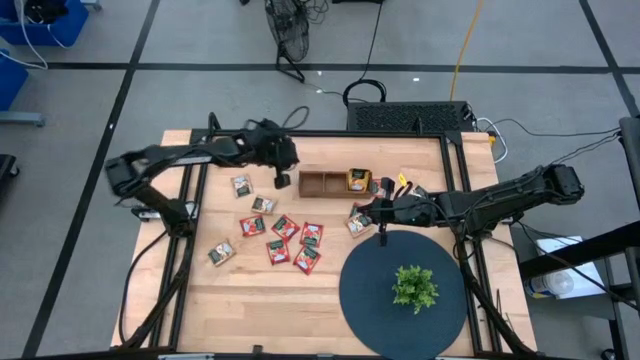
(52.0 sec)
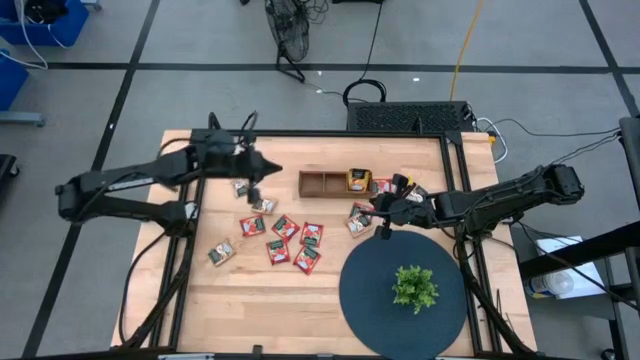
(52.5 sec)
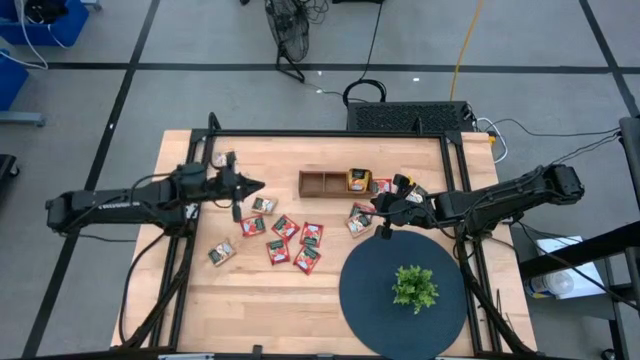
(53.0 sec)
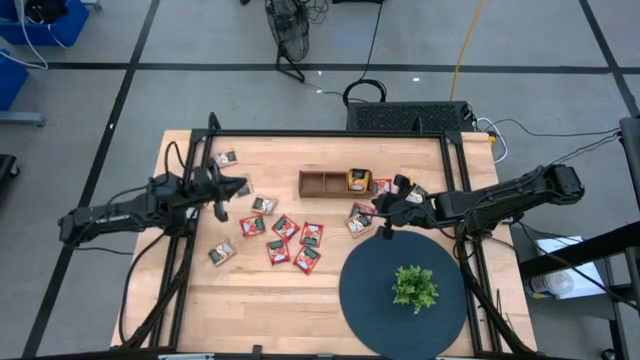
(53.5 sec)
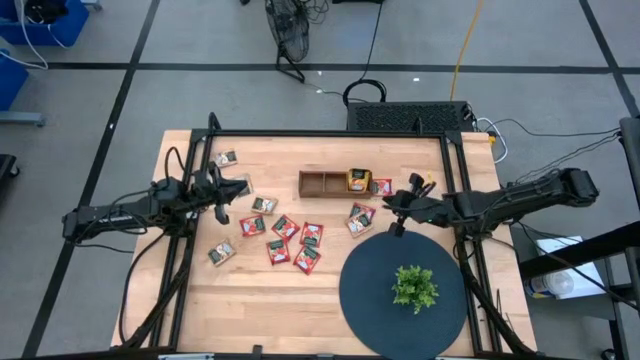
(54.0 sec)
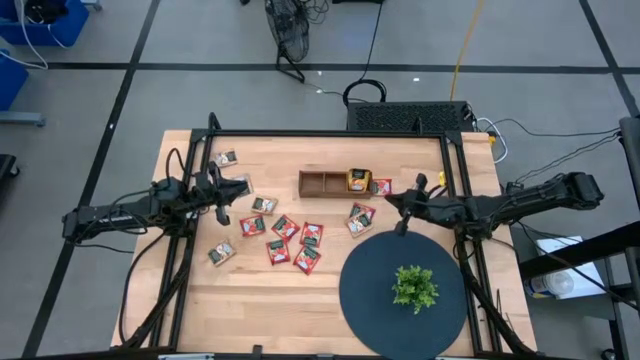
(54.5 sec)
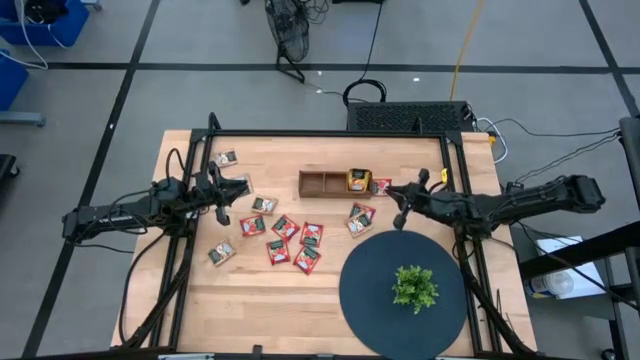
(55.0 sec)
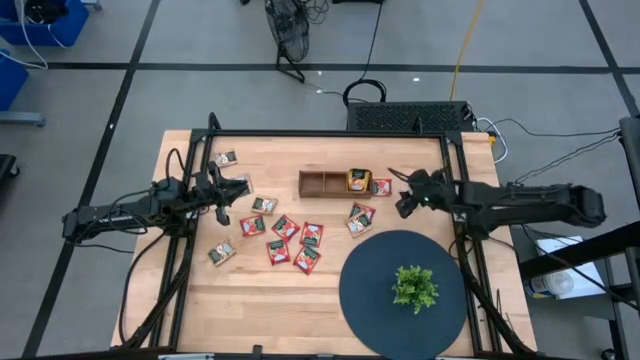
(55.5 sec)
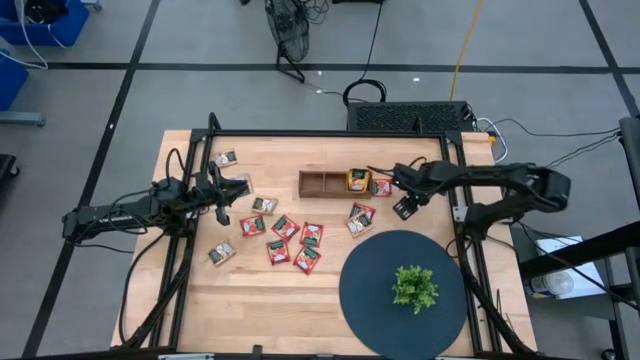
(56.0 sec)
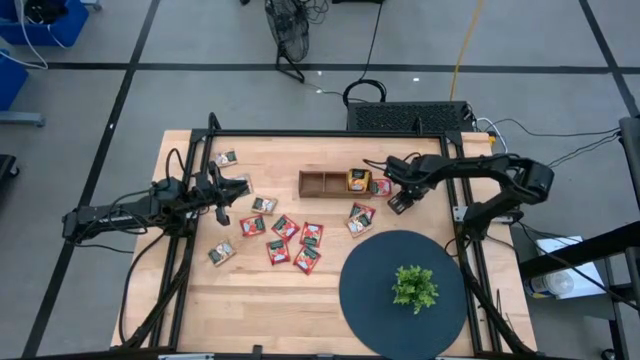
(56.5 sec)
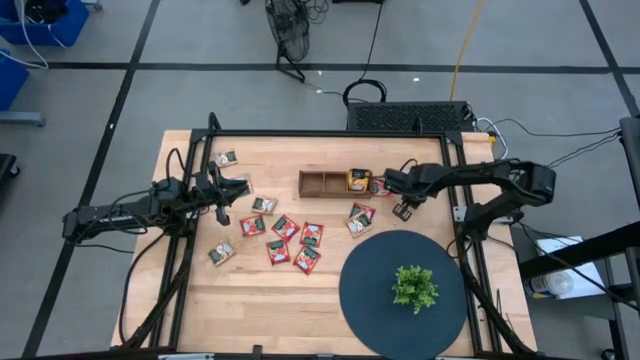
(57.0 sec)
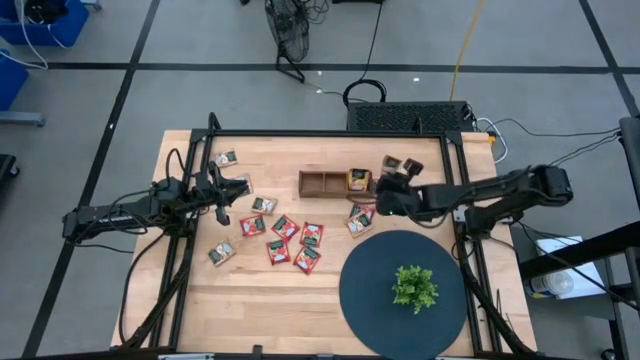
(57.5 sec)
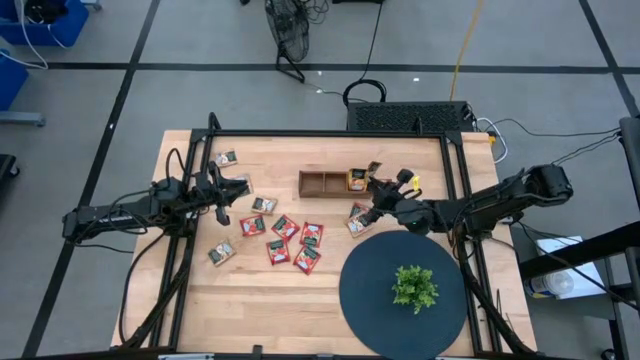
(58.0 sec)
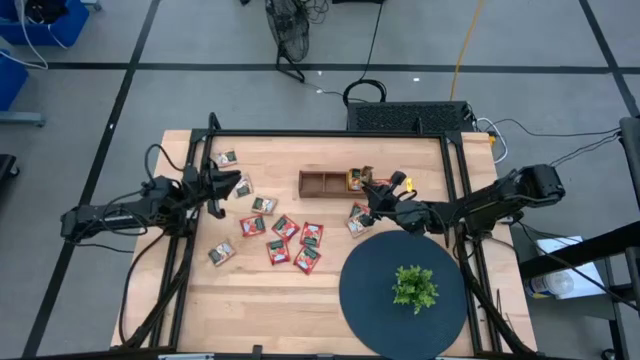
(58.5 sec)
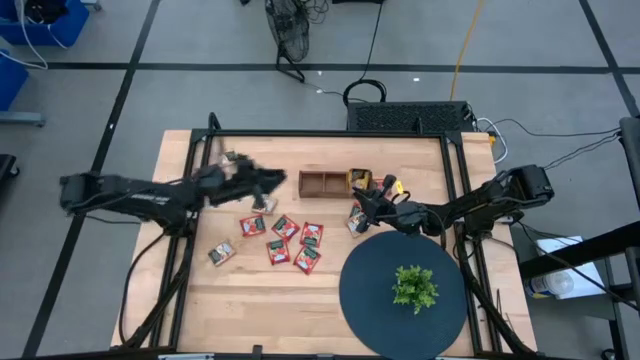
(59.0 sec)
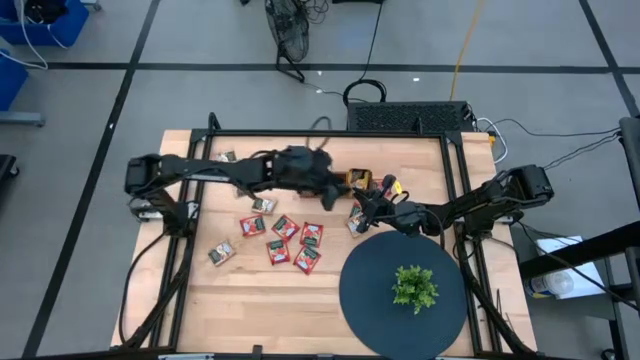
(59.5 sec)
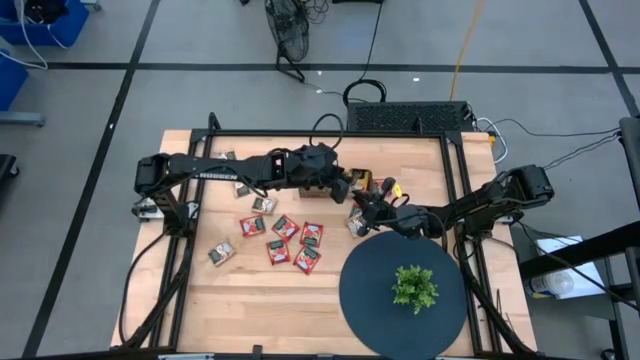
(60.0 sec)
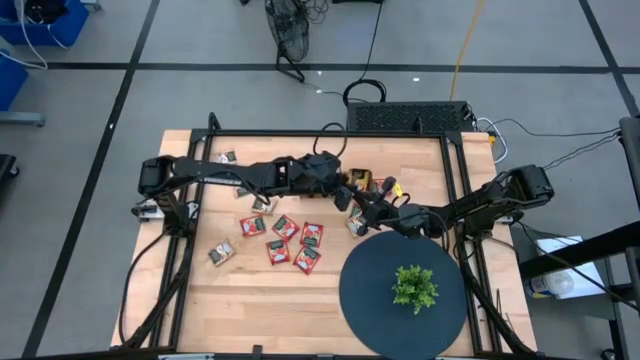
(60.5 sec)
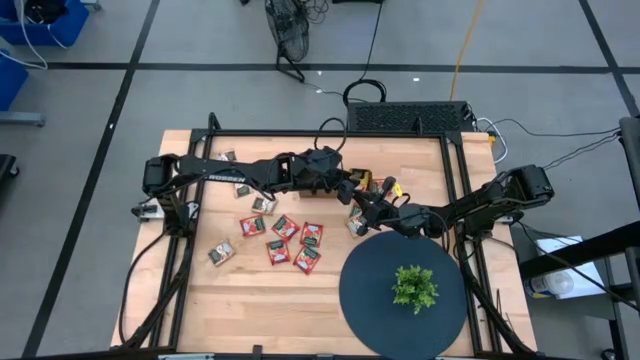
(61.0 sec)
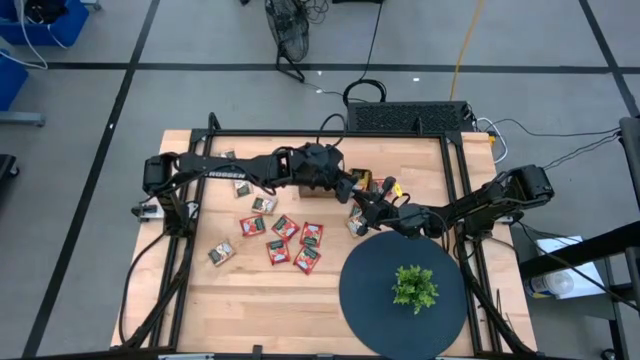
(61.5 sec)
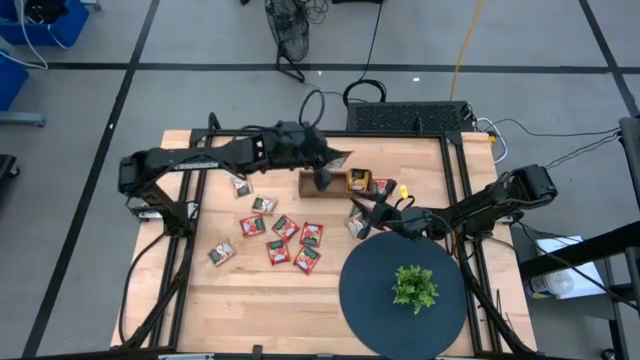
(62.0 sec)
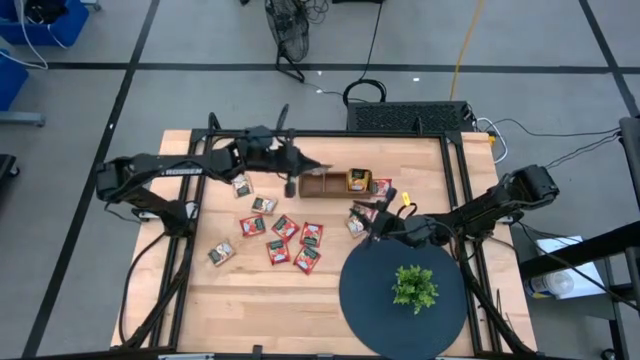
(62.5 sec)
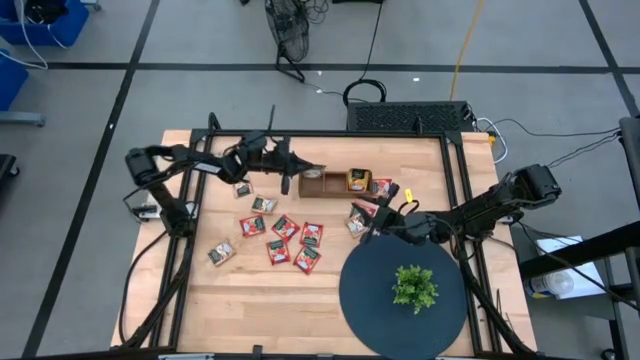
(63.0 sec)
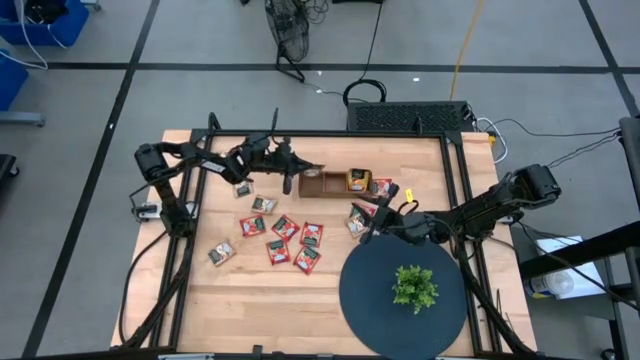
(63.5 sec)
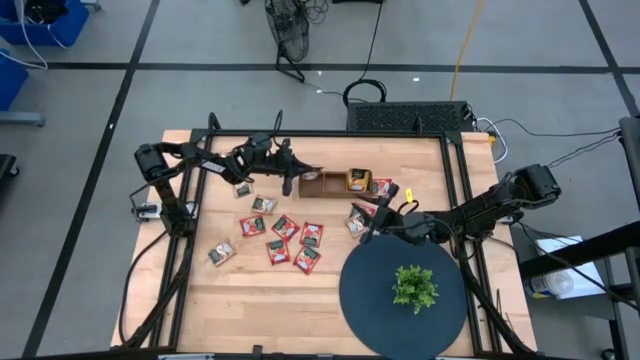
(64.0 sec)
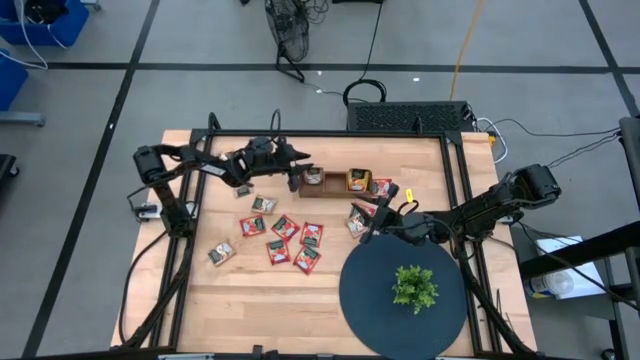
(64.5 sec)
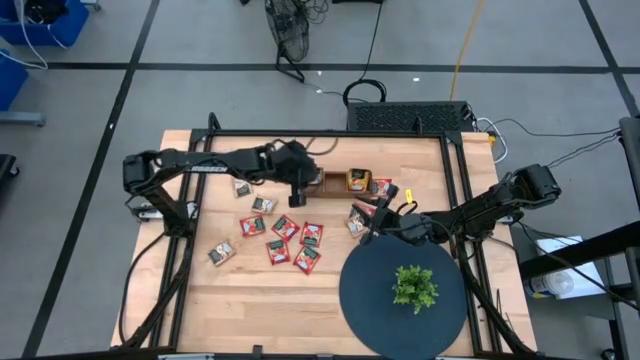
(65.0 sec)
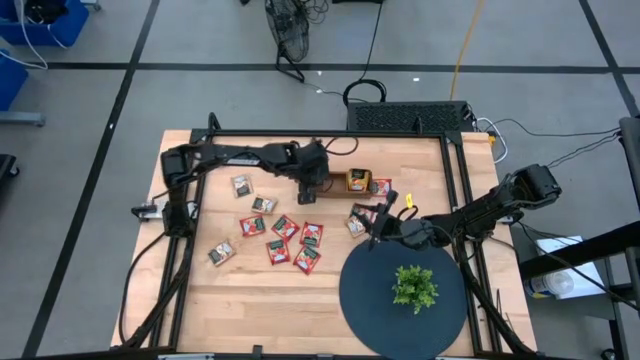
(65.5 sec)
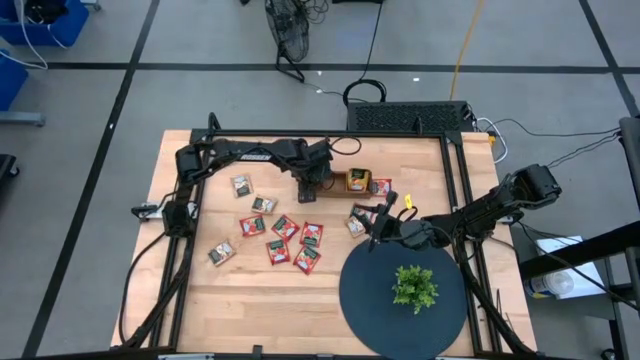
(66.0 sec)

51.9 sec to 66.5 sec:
Task: Pick & Place Tea
Put the brown tea bag into the left section wooden organizer

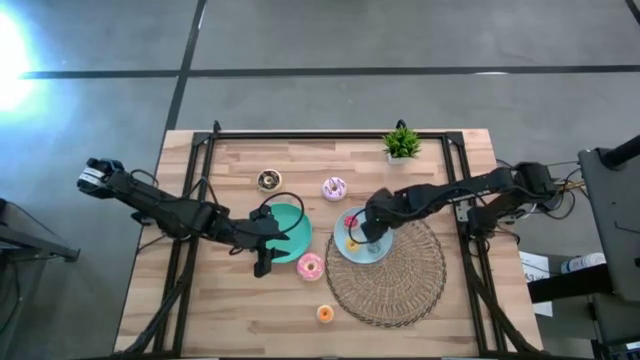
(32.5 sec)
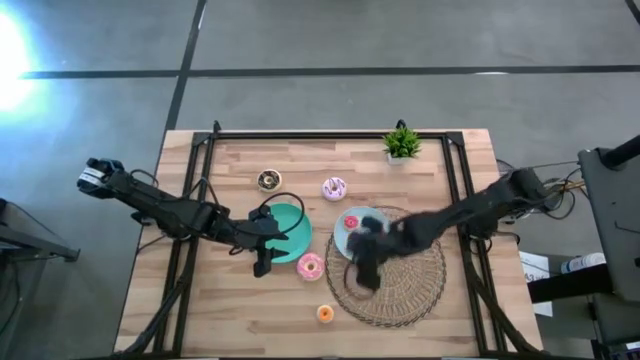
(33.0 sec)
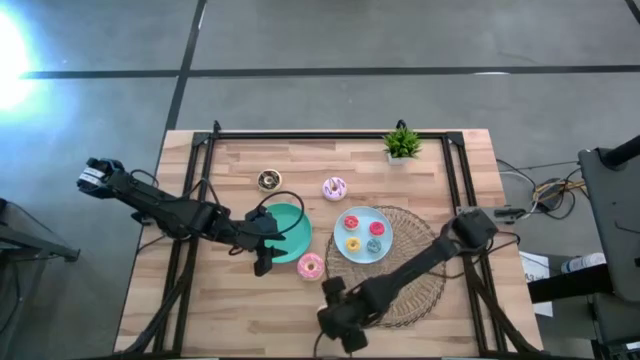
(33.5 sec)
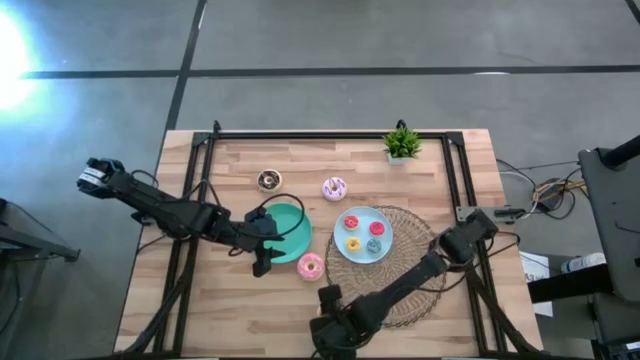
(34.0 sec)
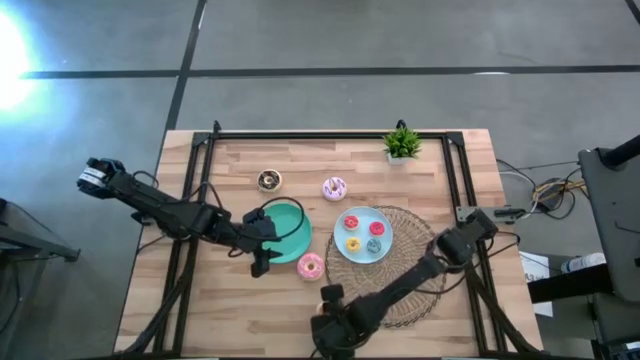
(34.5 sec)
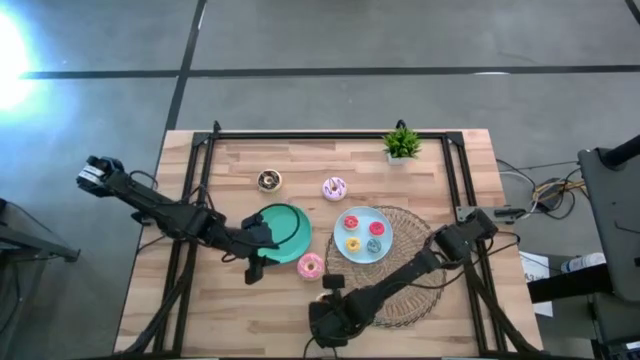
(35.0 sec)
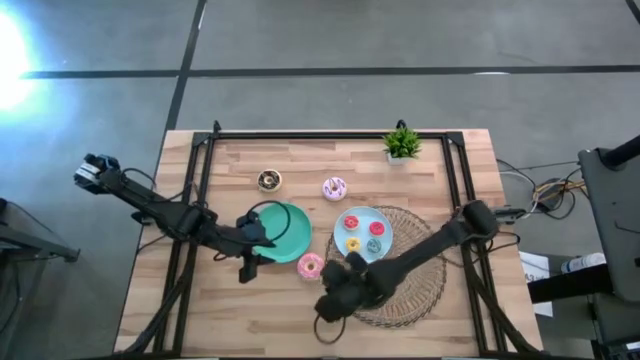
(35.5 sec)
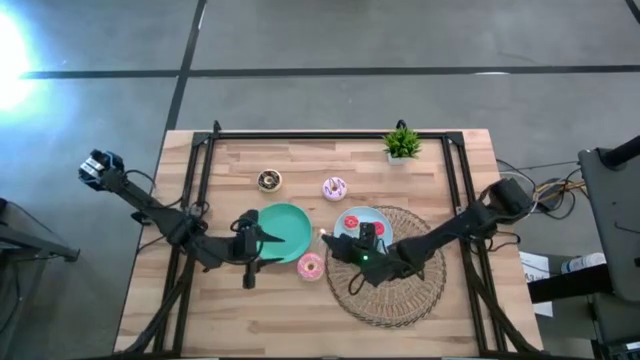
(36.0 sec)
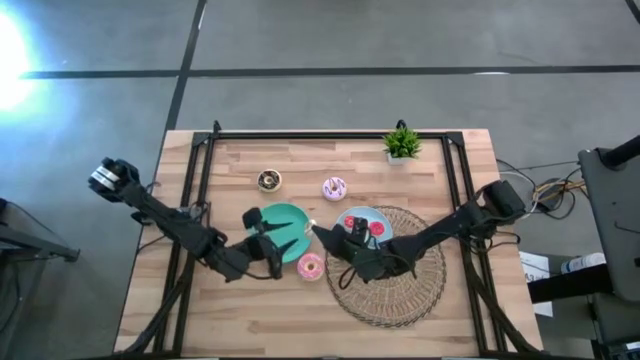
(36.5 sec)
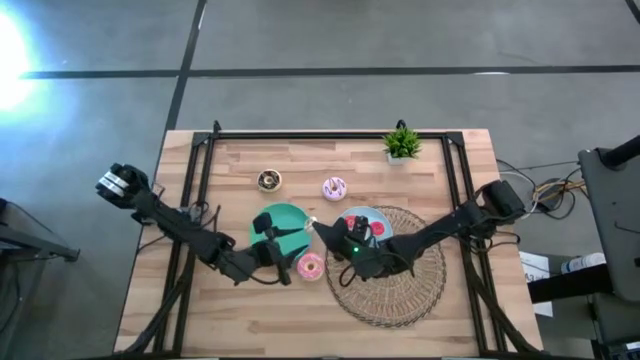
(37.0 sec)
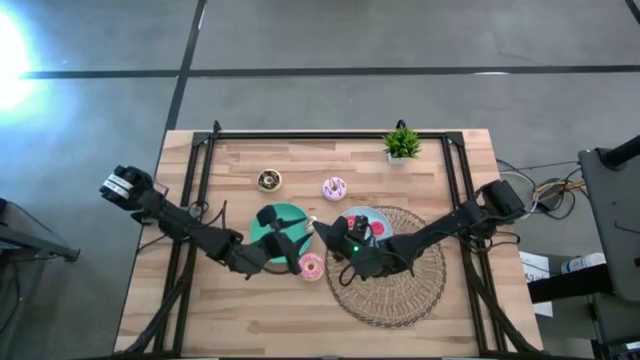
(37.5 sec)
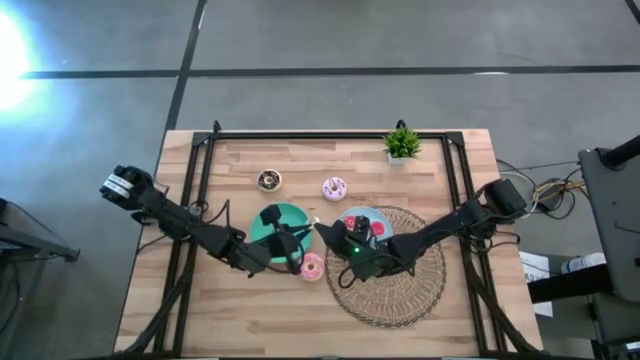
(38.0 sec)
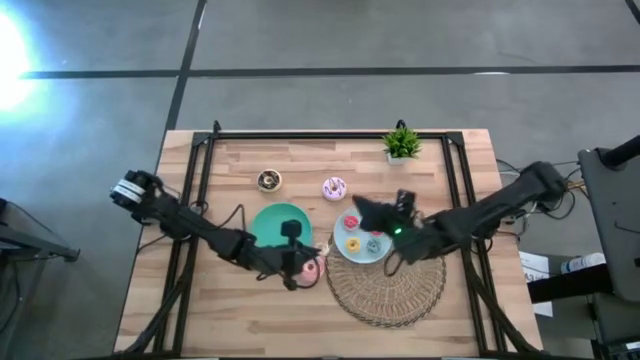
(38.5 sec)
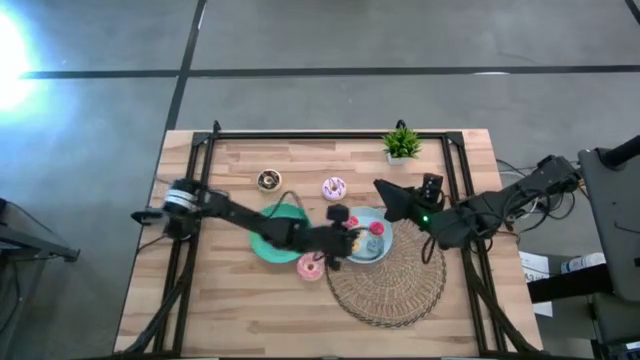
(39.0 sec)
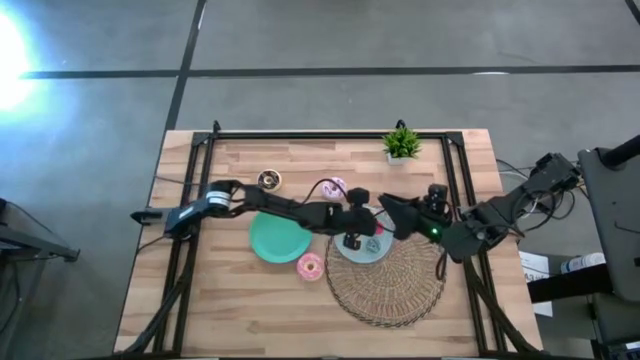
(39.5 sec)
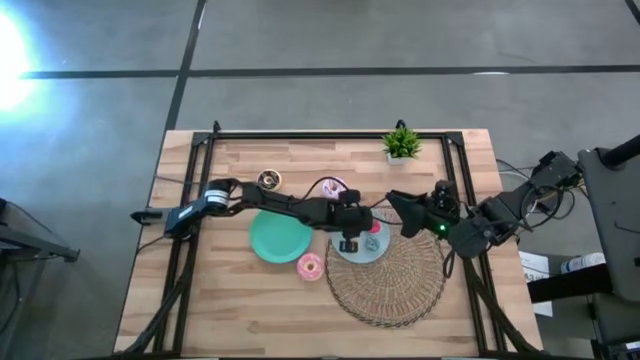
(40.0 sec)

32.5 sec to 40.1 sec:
Task: Pick & Place donuts
Put the small white donut on the blue plate
